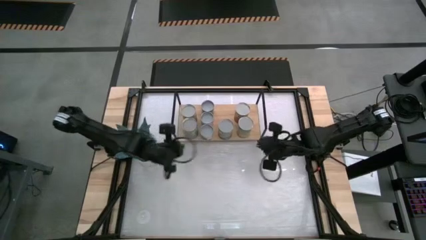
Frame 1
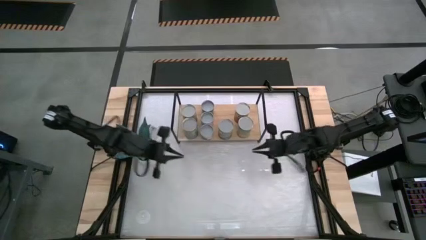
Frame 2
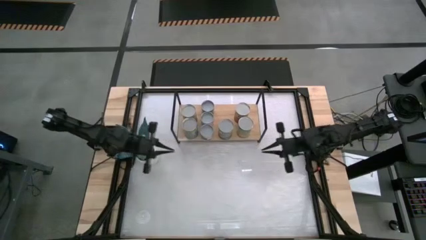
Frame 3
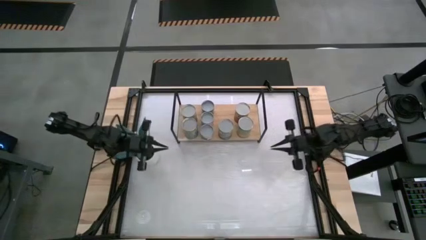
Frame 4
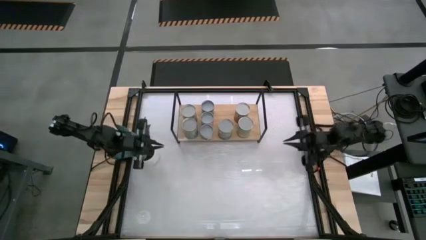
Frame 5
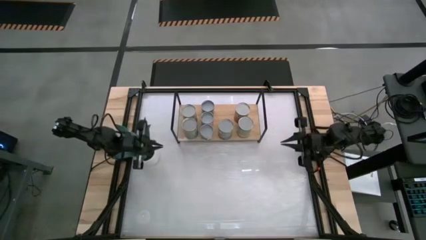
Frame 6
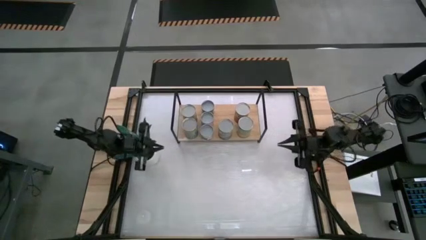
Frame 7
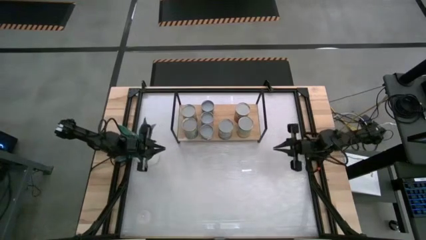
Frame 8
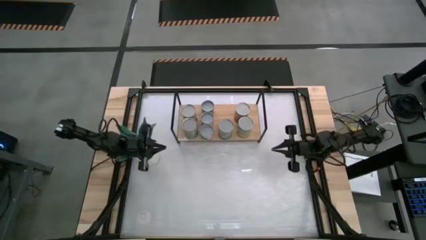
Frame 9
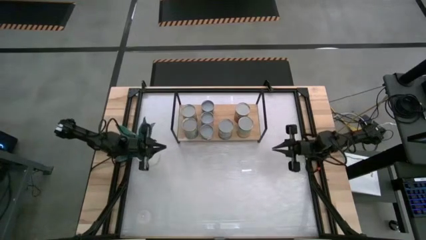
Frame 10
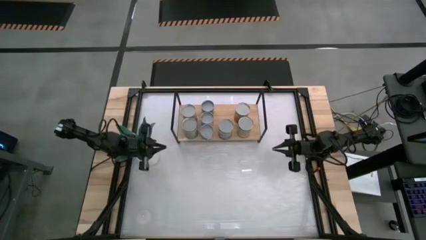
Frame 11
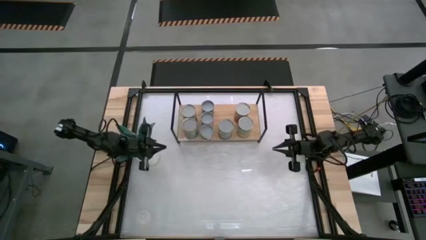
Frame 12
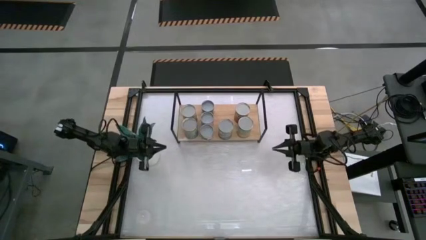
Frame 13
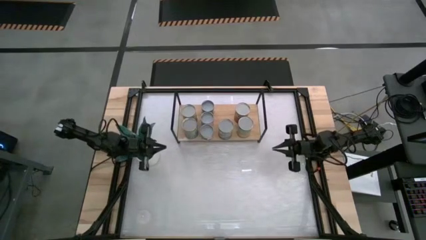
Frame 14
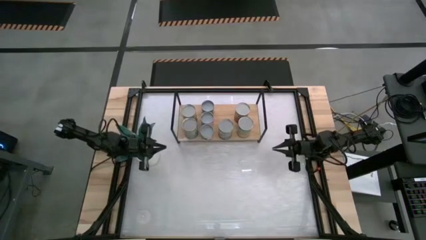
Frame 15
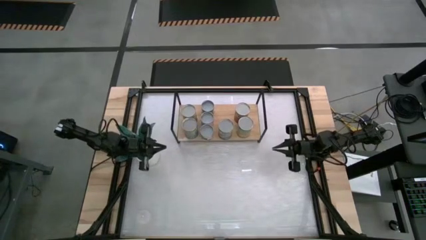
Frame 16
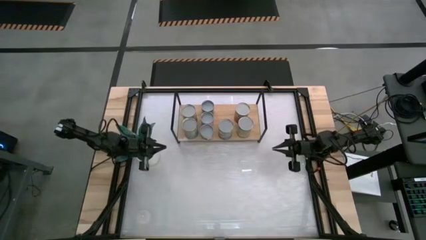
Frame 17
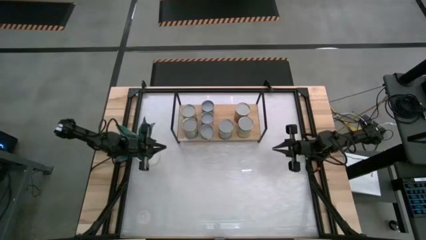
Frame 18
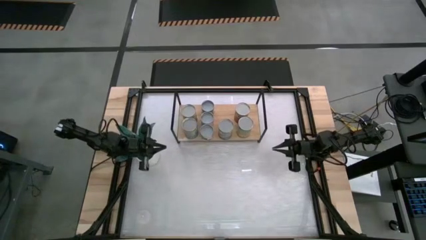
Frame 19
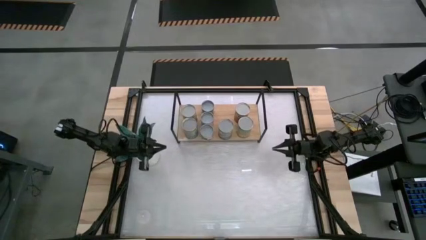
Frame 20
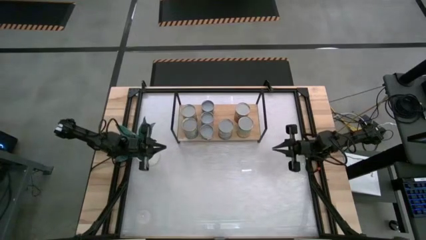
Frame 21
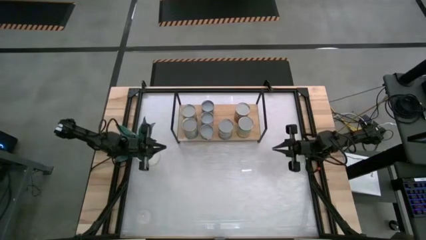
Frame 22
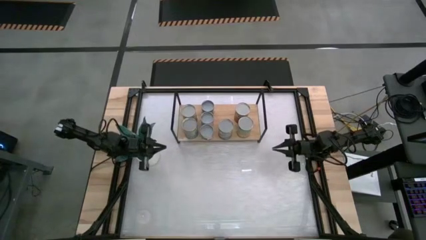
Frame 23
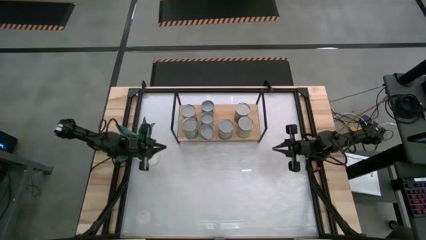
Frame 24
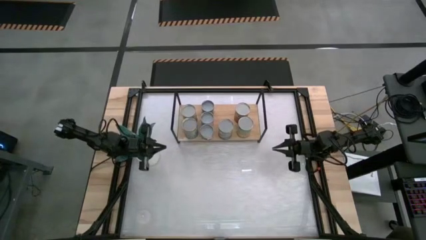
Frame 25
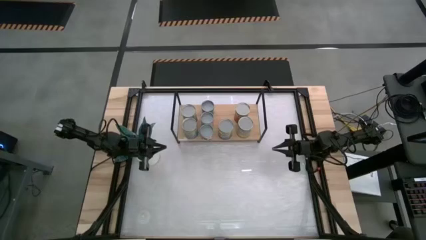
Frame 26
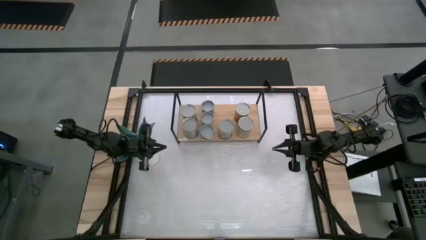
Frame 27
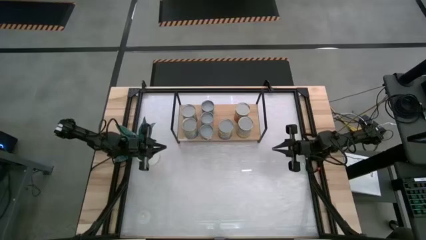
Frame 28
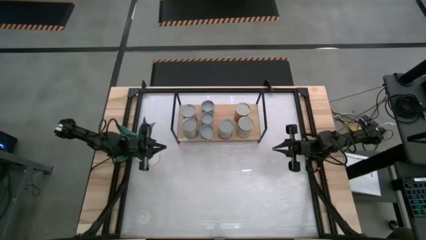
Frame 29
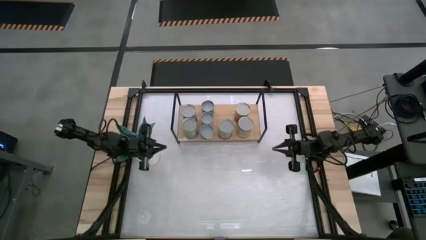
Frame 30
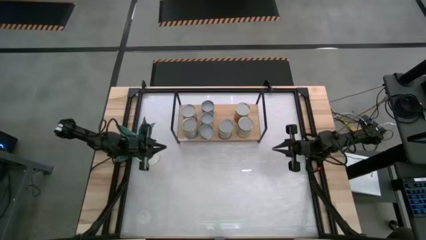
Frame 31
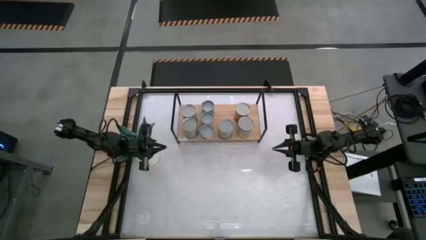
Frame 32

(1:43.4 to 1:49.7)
Task: Pick and place cans onto a shelf
Return to Home Position

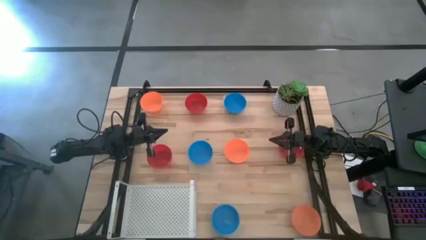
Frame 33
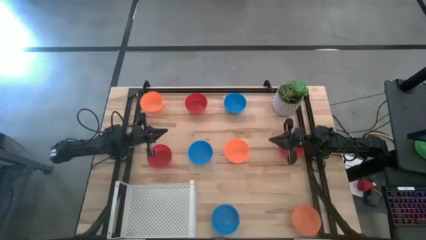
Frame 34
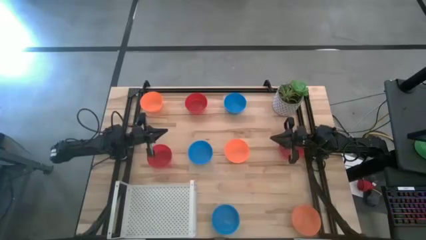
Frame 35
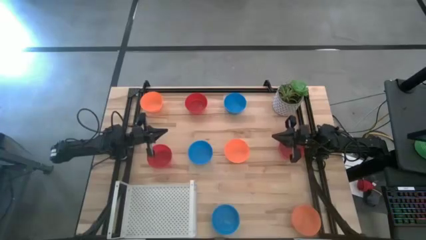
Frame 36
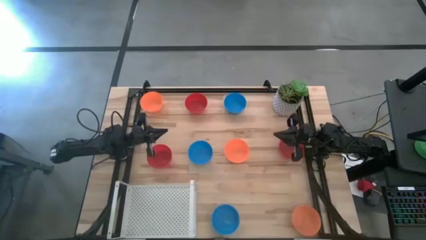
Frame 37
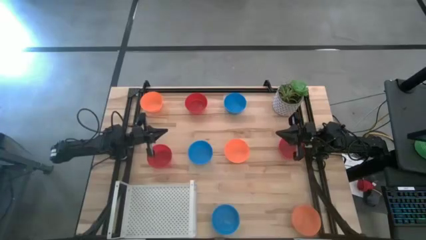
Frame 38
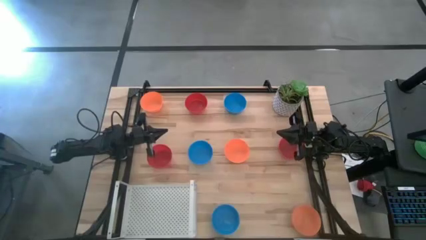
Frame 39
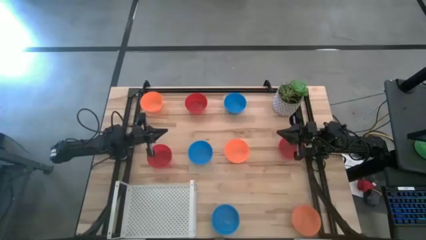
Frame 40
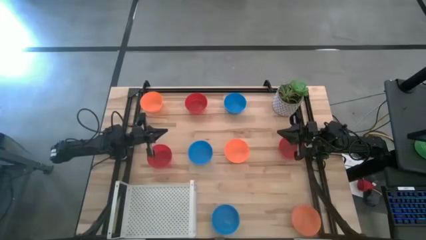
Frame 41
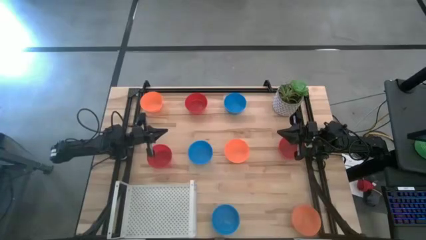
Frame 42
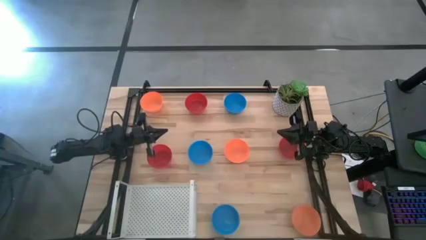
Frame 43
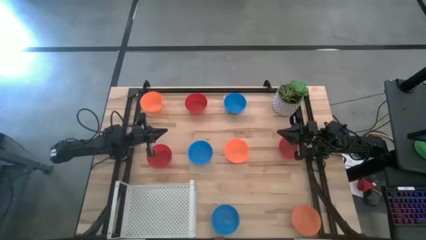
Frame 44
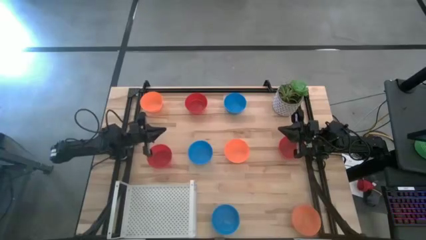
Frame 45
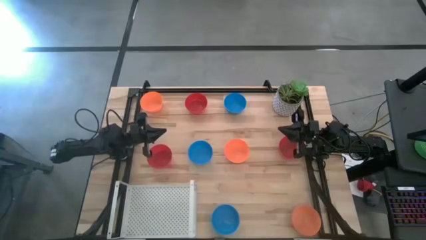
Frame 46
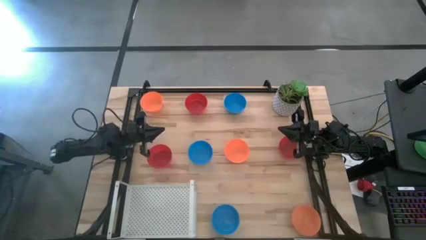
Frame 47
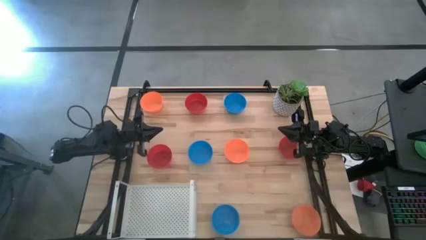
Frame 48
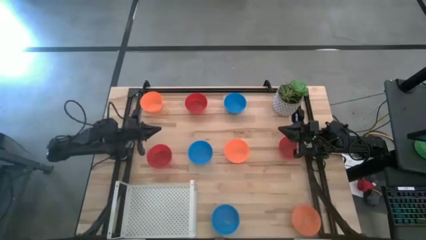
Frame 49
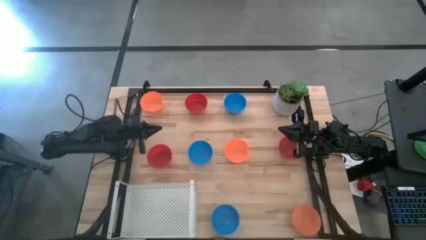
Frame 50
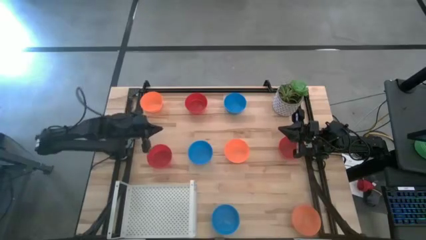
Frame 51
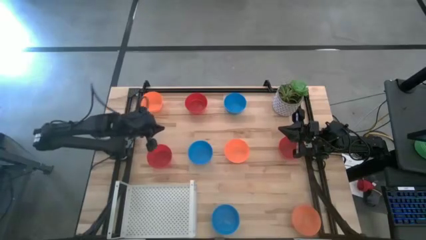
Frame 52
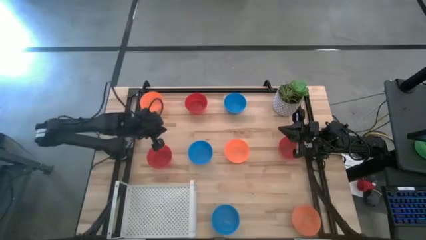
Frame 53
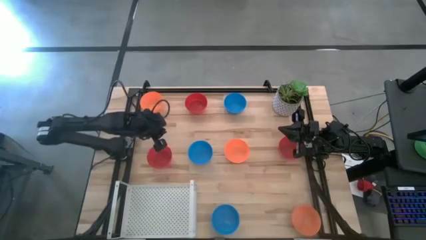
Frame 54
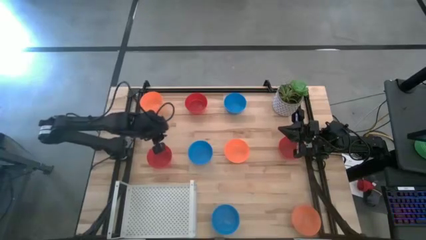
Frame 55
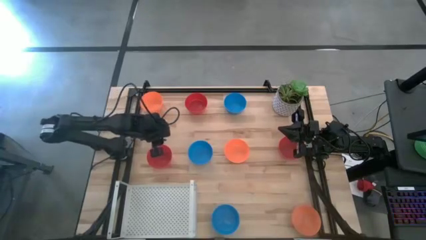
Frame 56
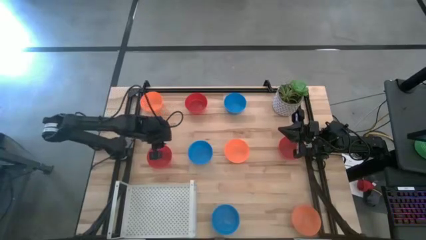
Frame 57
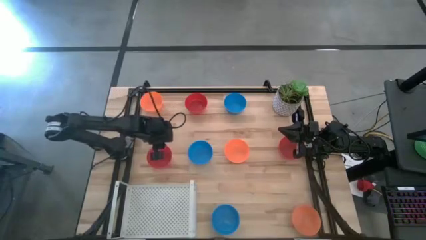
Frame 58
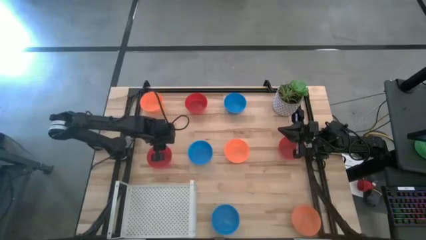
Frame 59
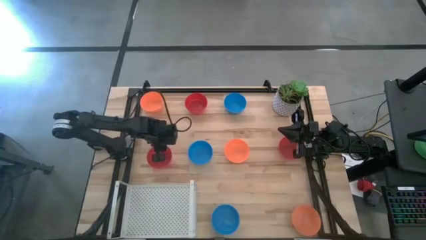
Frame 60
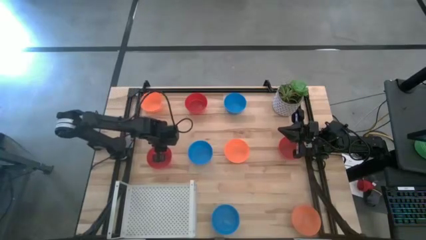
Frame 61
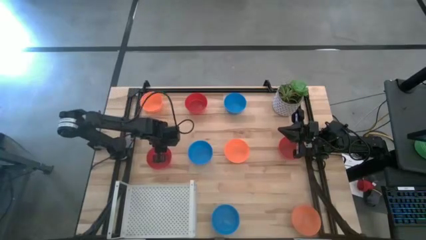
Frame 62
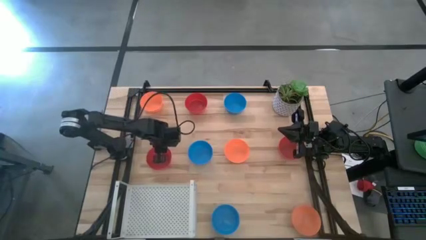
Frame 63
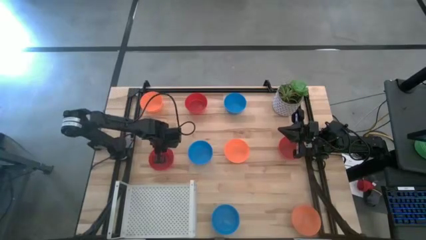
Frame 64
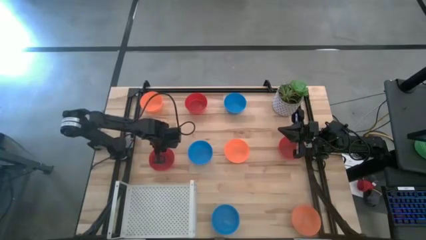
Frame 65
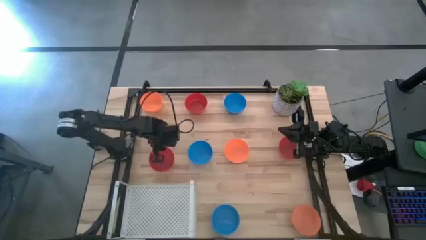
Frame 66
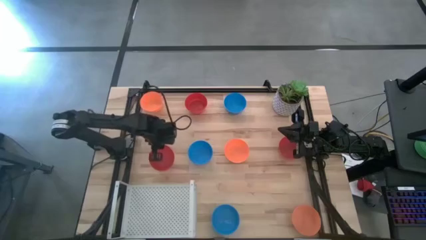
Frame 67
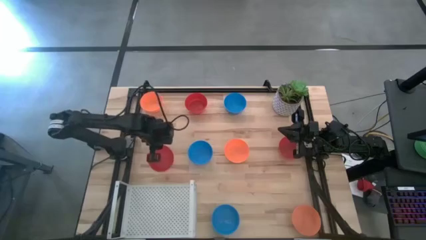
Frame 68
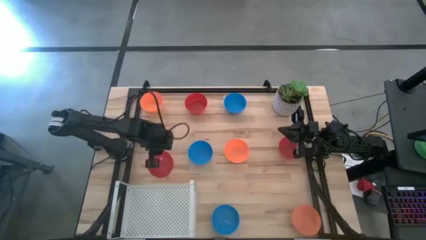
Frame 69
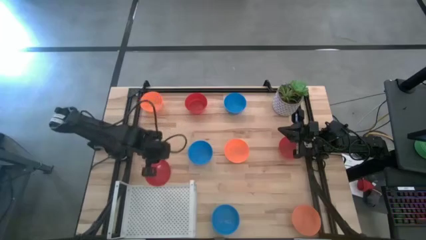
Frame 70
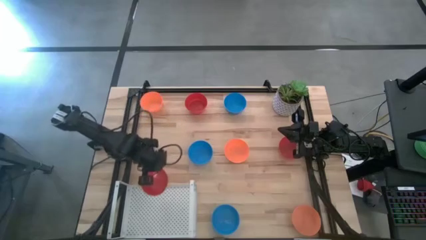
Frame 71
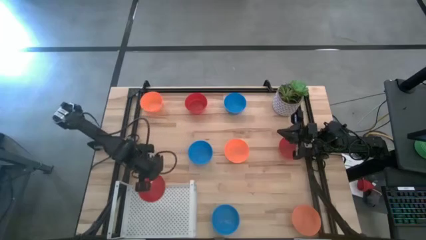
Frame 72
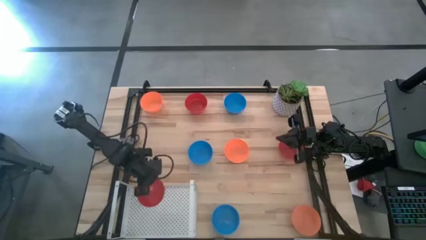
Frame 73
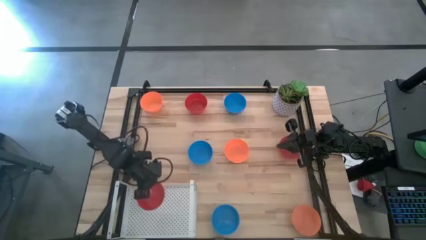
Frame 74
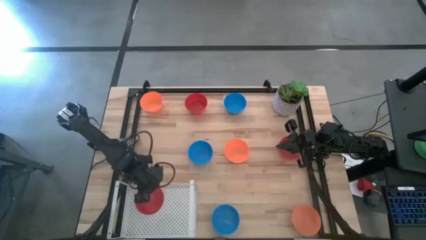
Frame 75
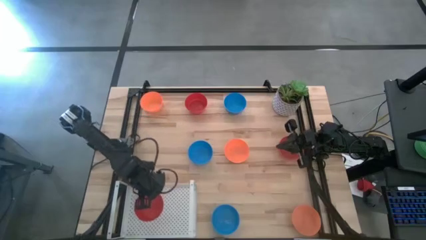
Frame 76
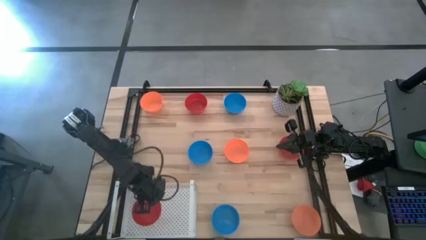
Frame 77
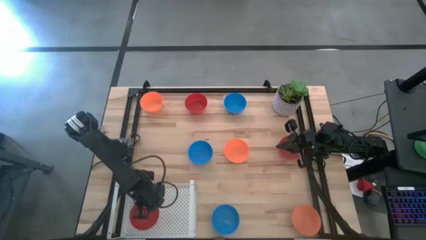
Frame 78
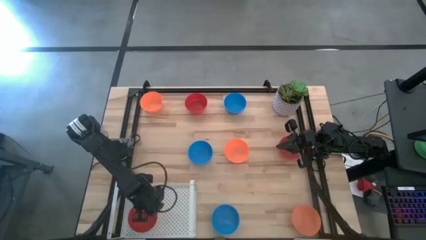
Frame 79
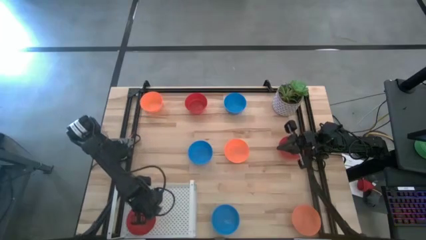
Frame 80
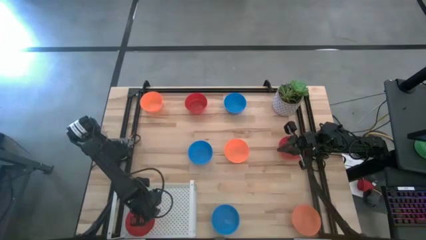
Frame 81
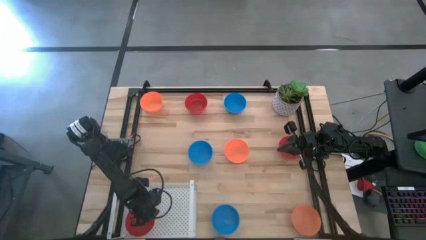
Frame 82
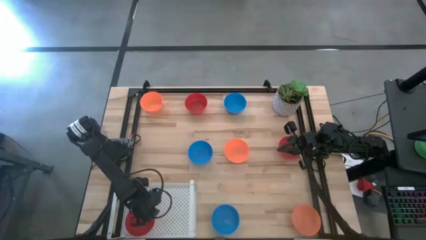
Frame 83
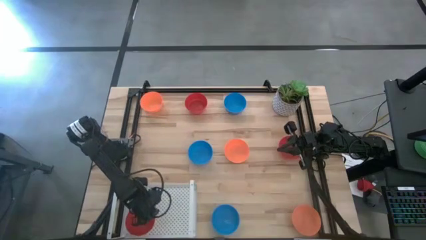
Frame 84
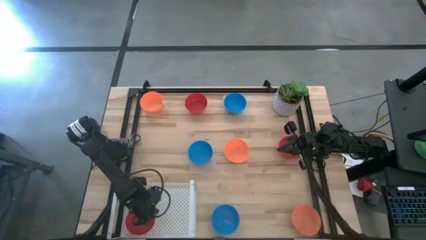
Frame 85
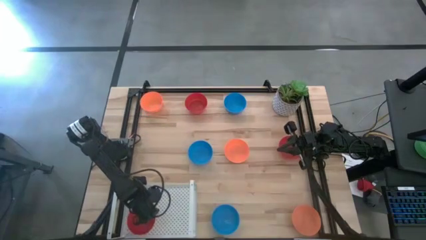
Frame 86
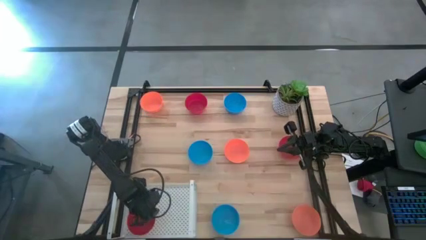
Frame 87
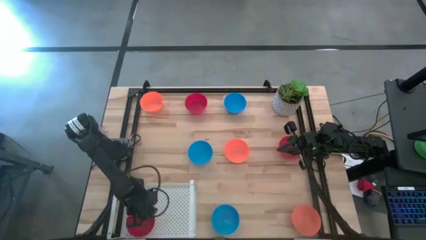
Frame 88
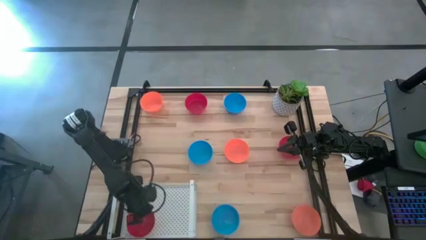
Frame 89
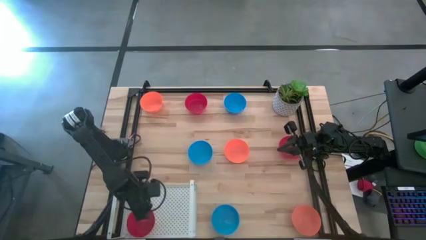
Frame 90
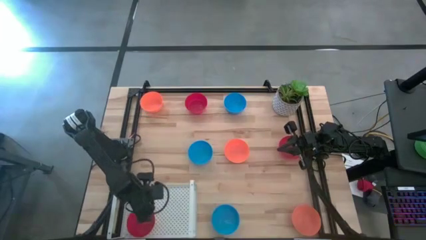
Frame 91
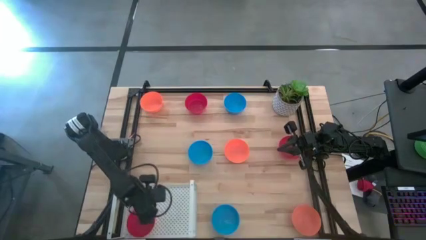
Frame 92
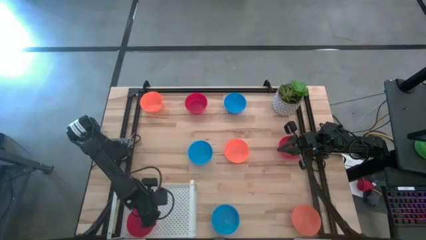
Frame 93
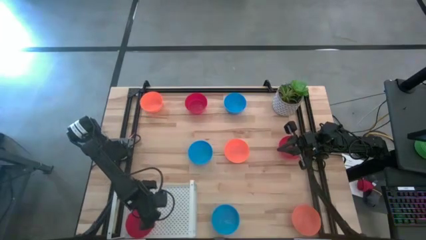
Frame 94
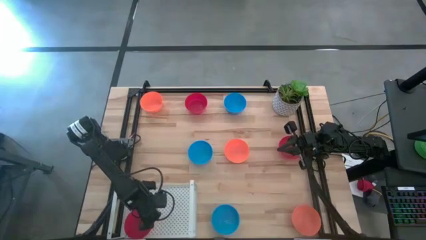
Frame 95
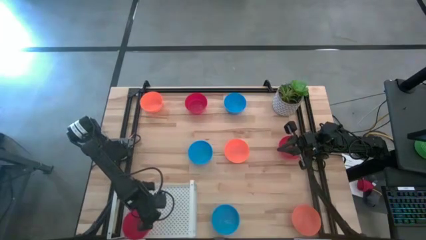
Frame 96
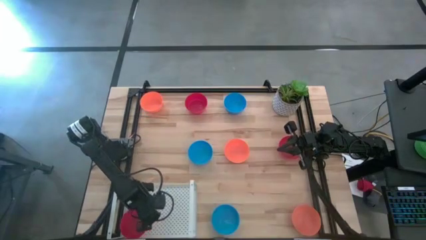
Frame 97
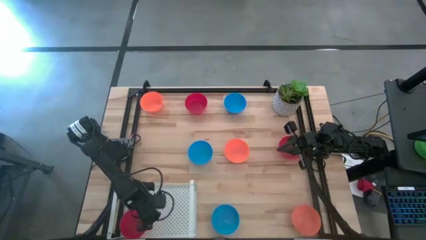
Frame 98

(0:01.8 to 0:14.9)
Task: Pick & Place Mini bowls
Put the bottom left red bowl on the shelf
